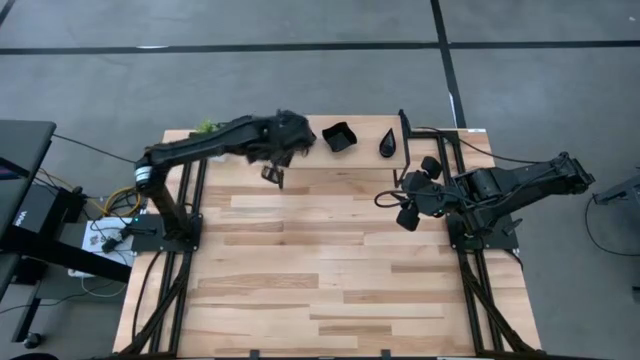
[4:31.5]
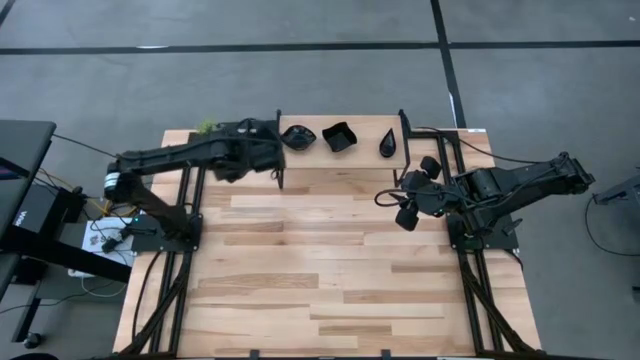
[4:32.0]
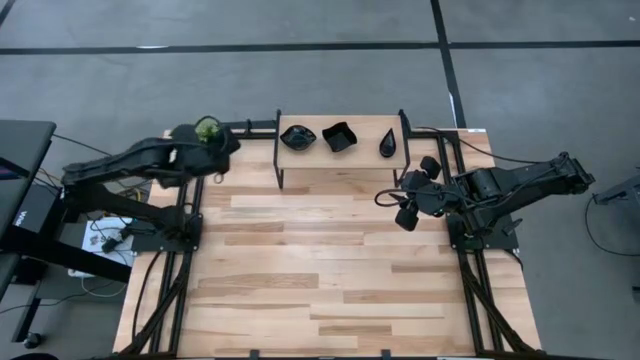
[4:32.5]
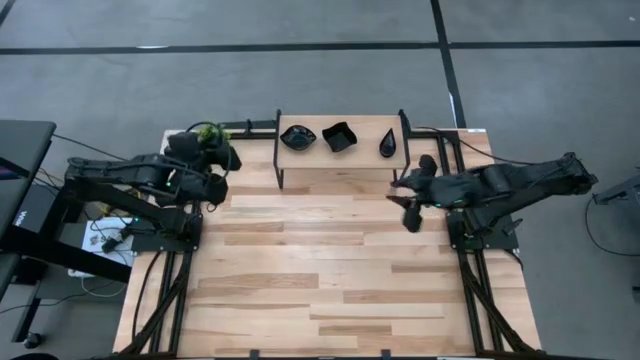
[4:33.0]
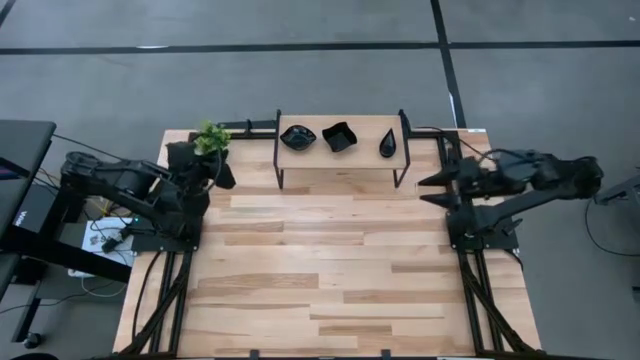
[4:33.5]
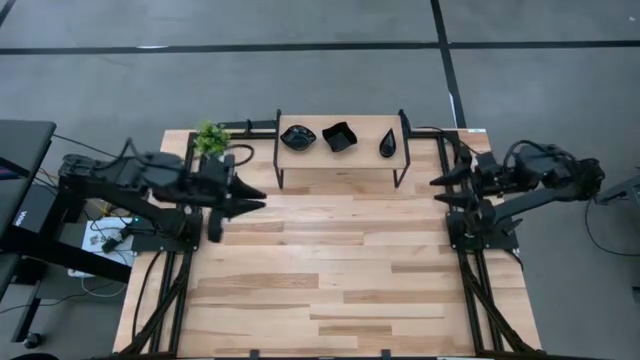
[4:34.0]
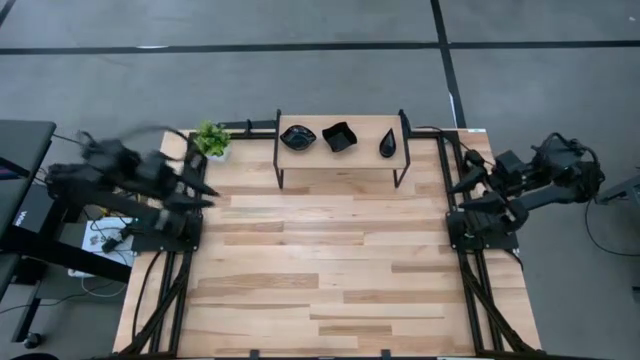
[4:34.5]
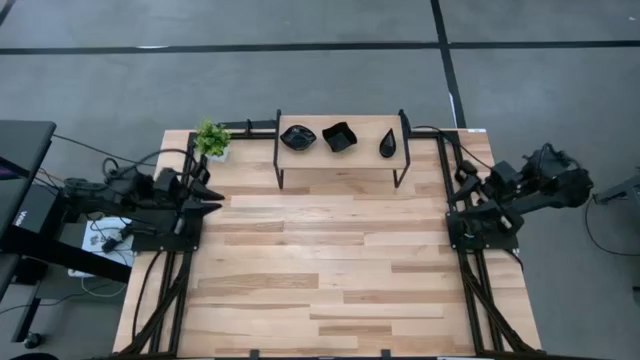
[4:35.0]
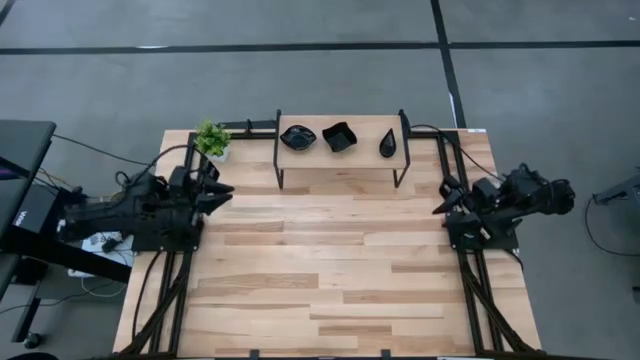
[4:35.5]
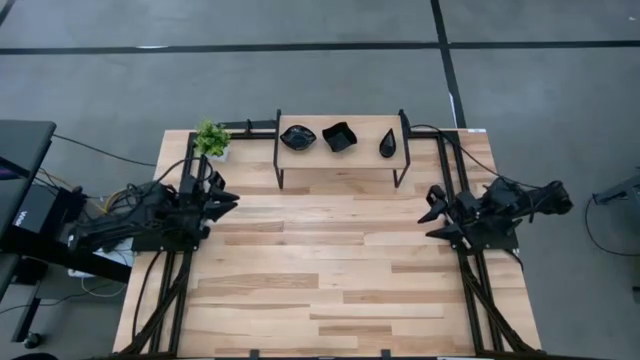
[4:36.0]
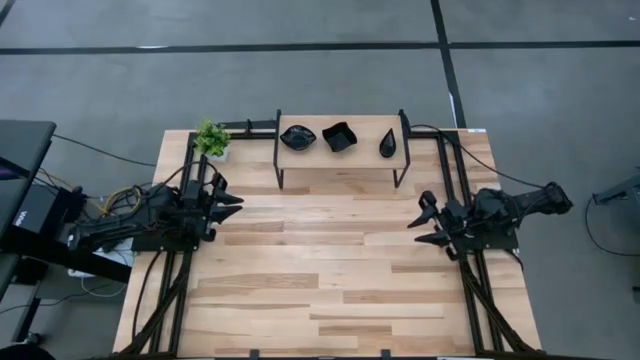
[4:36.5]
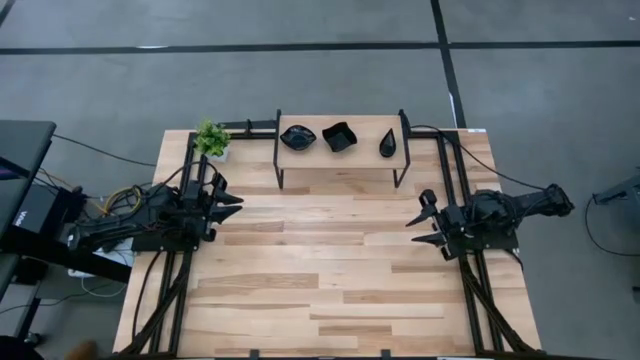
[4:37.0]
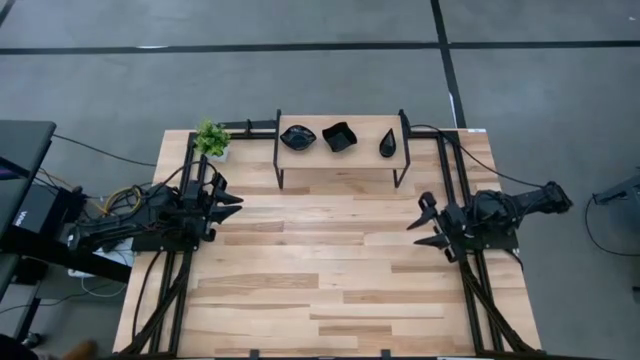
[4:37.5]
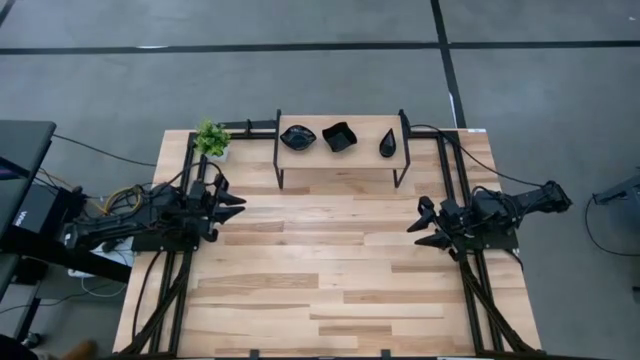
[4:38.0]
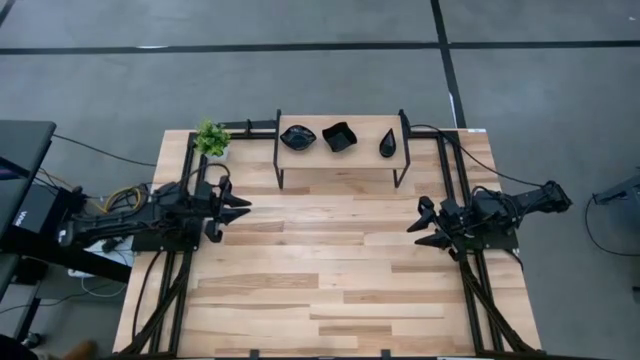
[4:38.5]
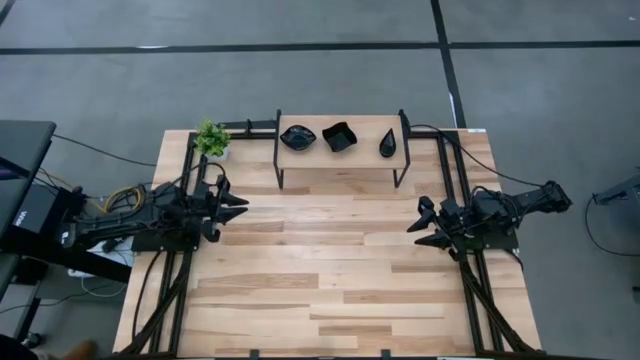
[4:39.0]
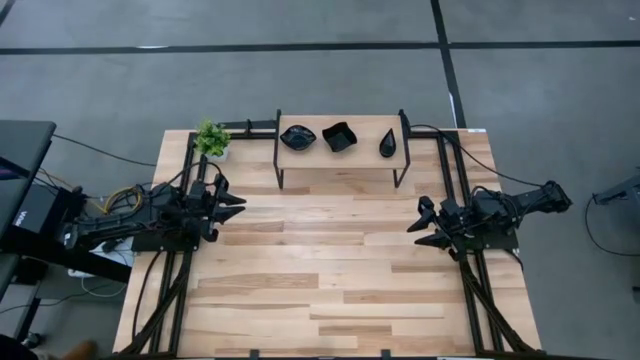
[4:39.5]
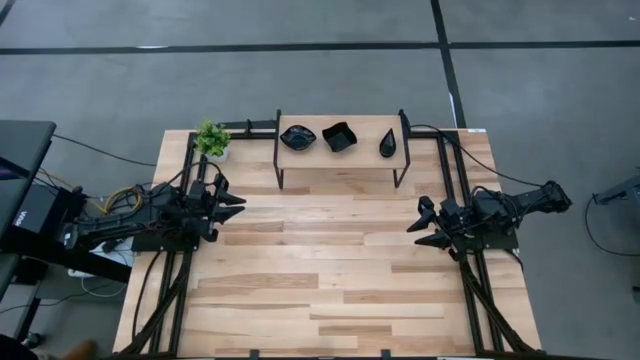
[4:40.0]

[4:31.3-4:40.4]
Task: Pick & Place Mini shaped plates
Return to Home Position

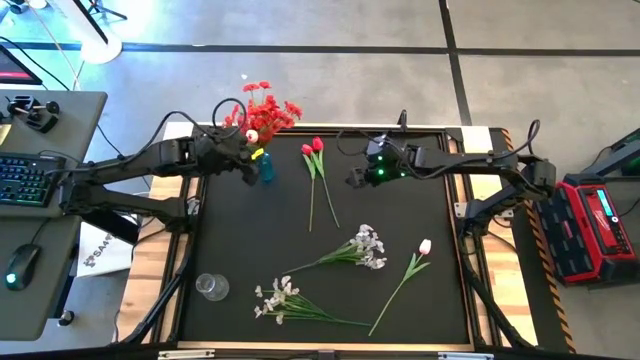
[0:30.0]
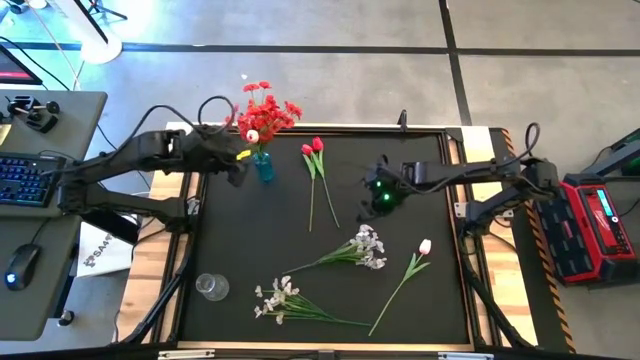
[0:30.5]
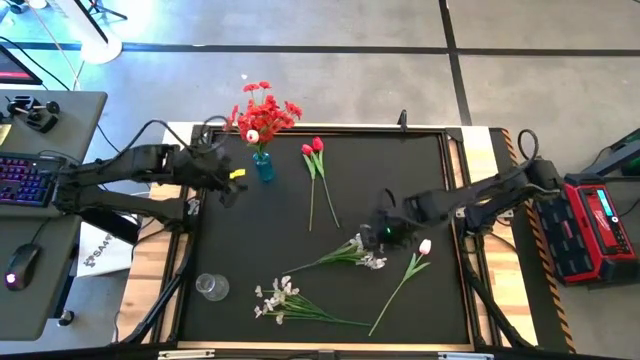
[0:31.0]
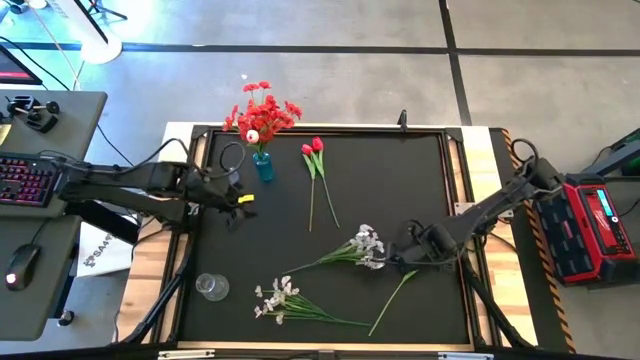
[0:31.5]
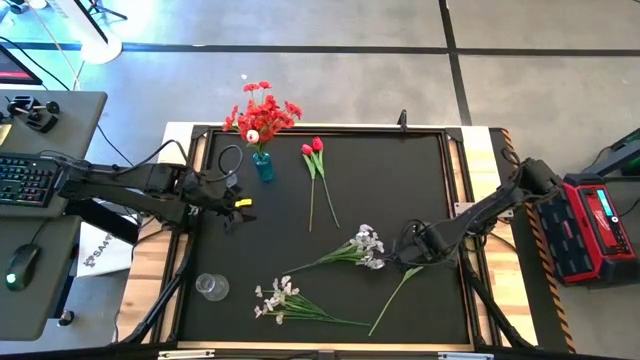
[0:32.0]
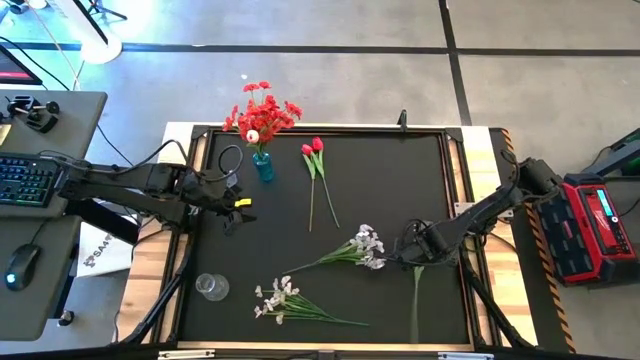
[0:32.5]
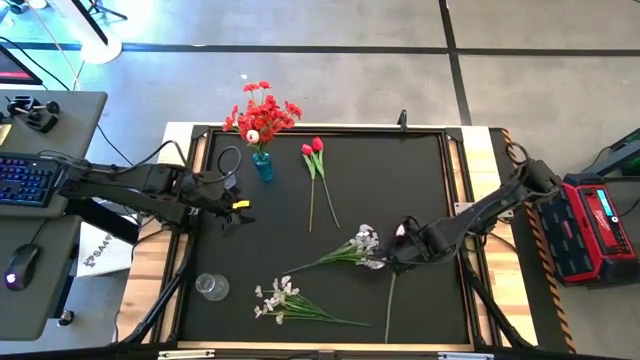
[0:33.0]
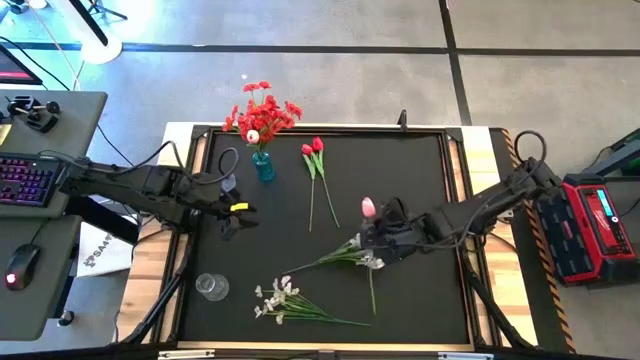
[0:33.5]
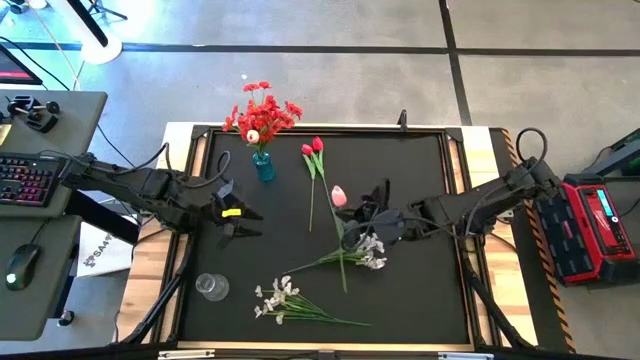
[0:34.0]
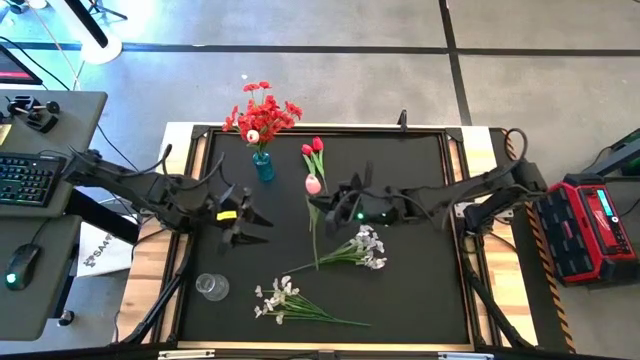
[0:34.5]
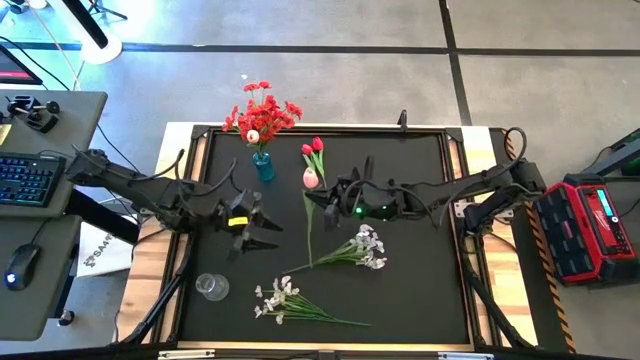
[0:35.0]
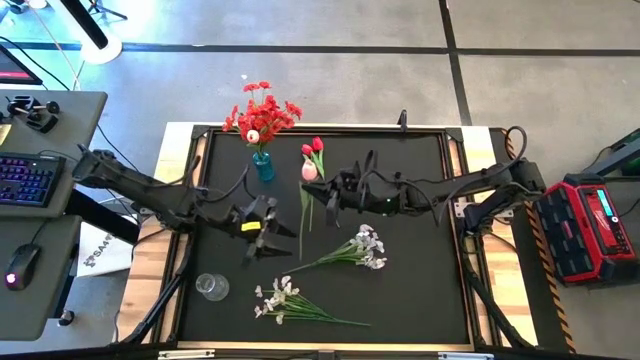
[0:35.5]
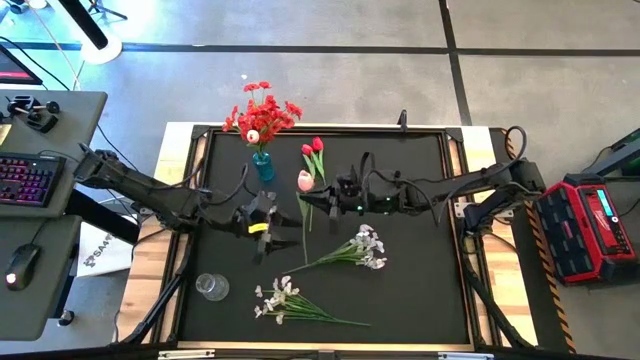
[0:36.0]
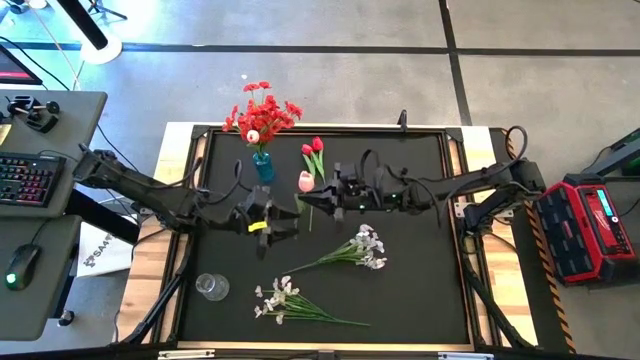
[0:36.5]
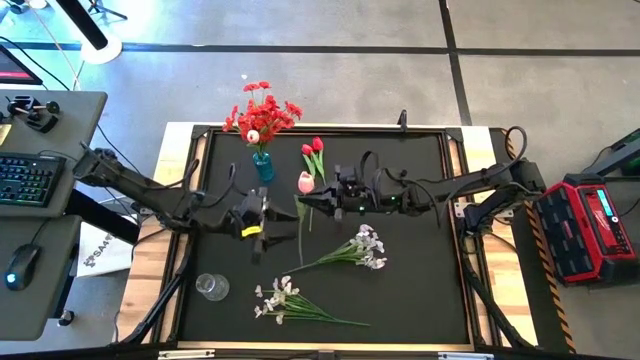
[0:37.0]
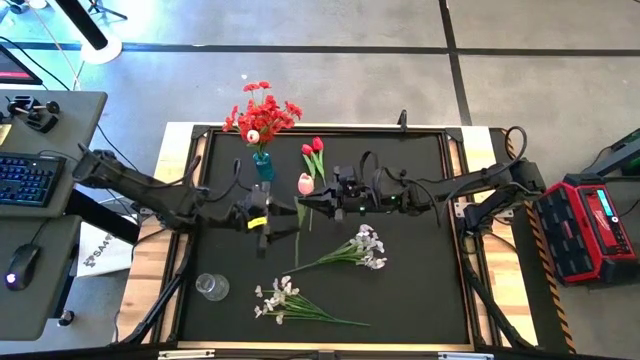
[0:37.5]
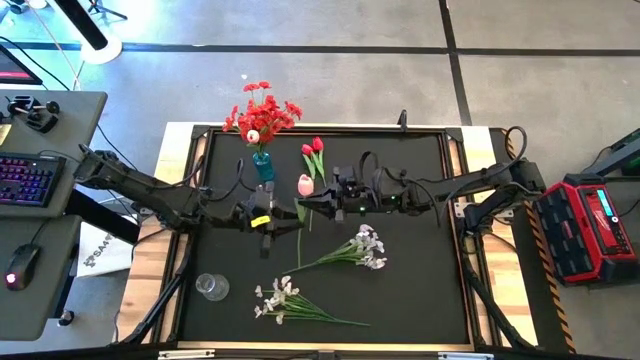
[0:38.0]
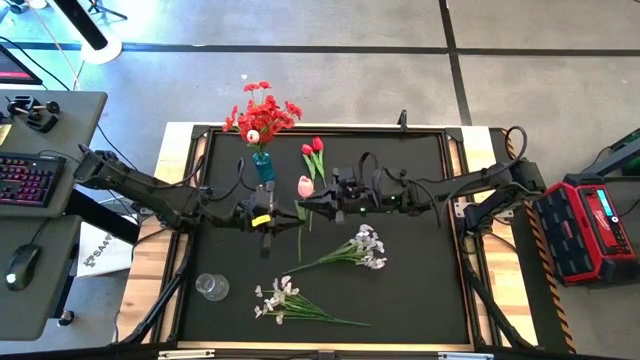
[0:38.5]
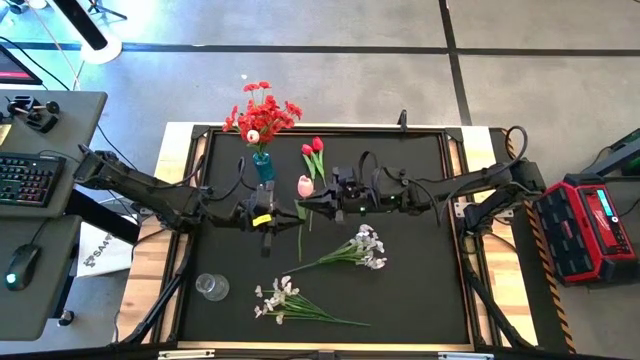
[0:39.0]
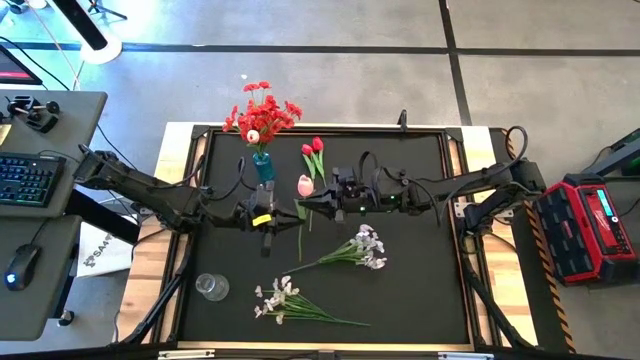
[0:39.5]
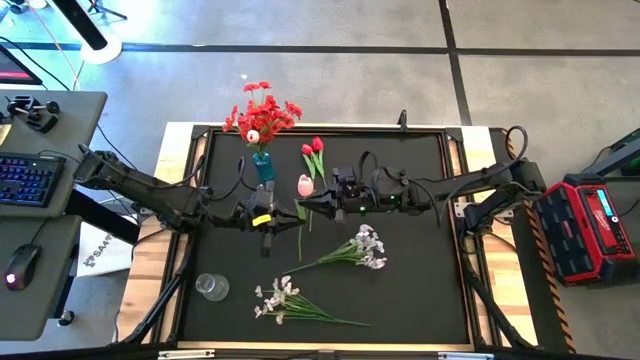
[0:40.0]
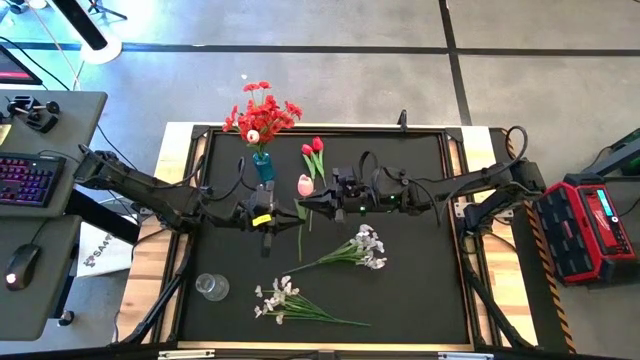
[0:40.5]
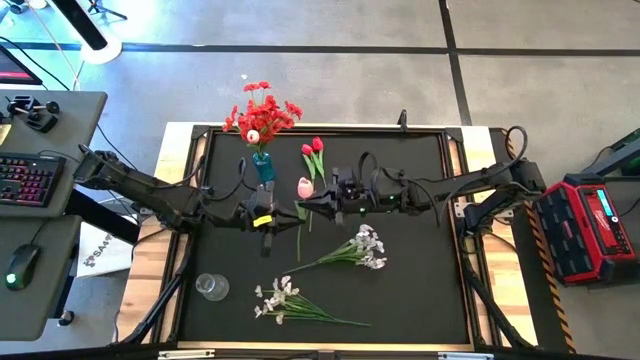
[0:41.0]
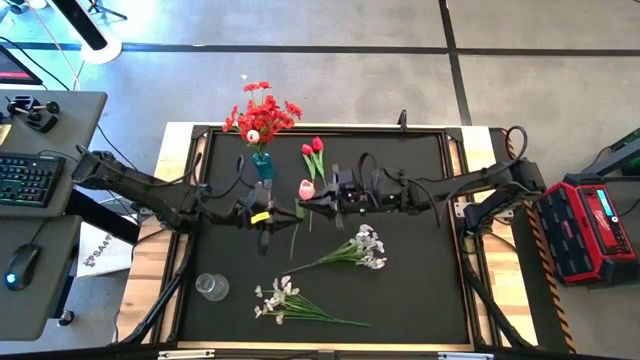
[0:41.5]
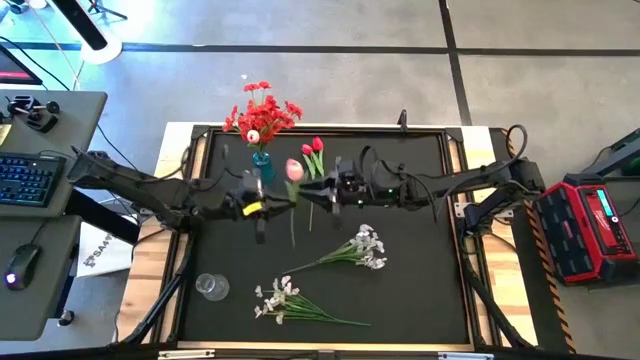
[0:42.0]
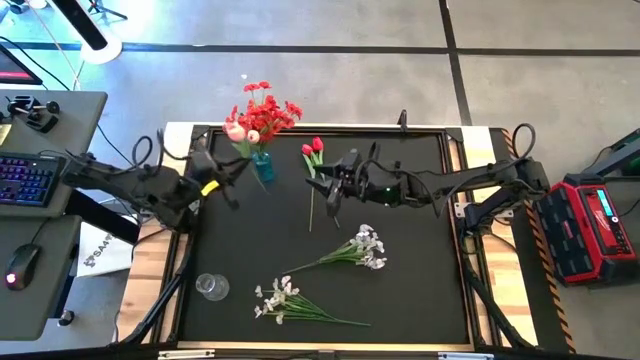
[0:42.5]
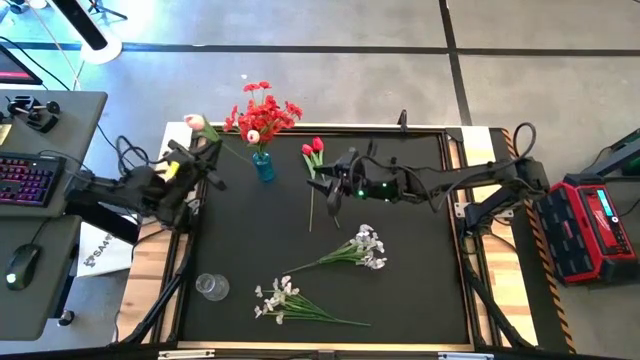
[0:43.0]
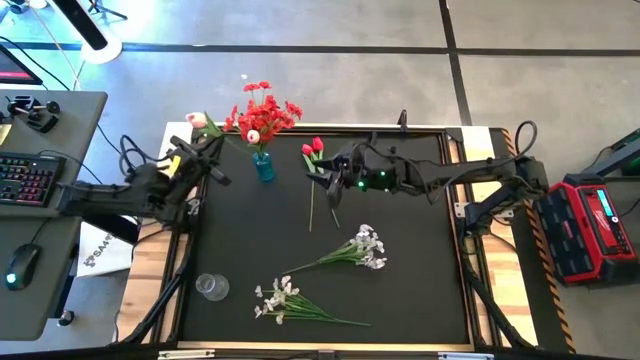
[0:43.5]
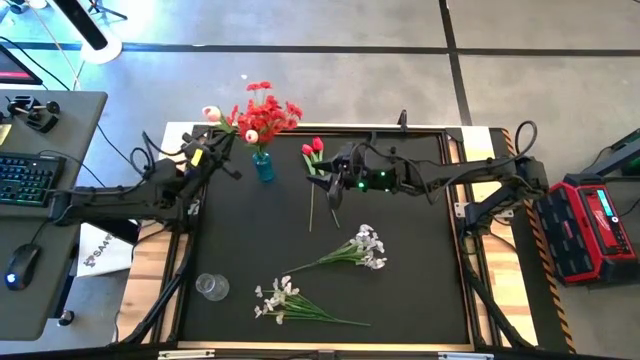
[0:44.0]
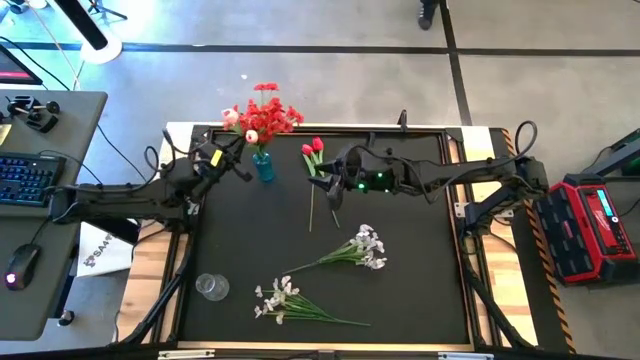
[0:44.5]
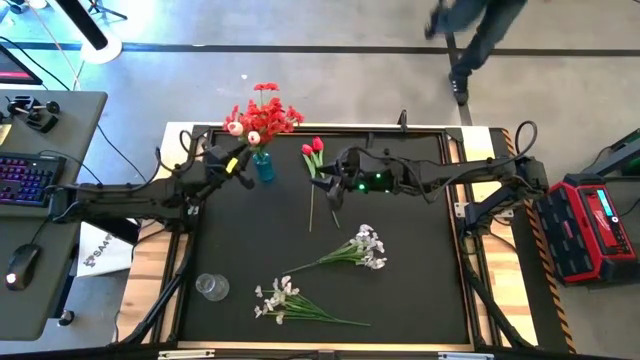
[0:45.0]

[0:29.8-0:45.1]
Task: Sort flowers into vase by color
Put the pink flower into the blue vase
